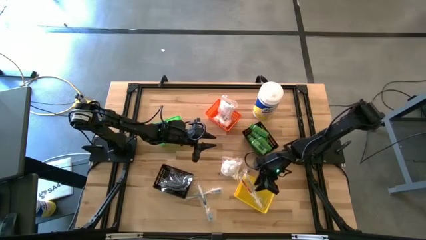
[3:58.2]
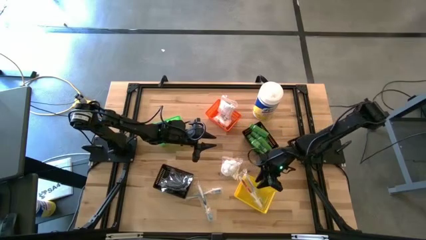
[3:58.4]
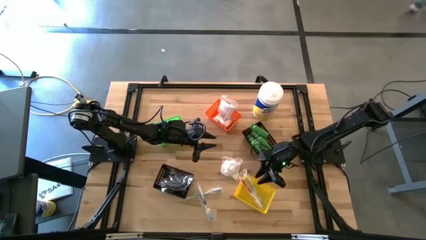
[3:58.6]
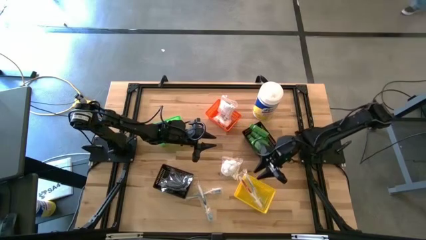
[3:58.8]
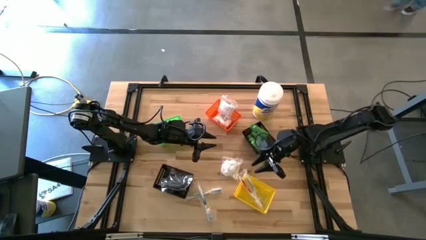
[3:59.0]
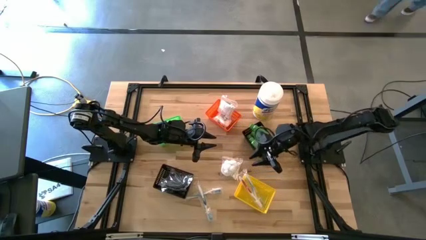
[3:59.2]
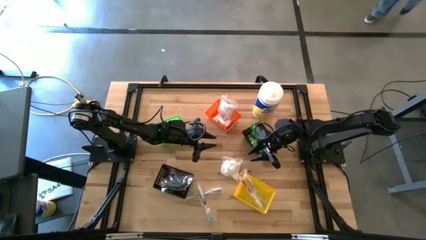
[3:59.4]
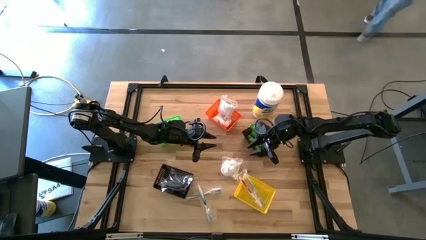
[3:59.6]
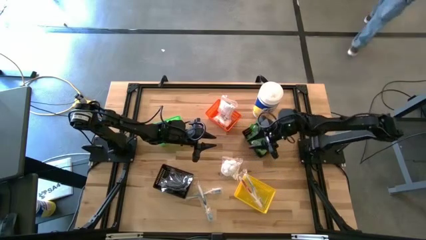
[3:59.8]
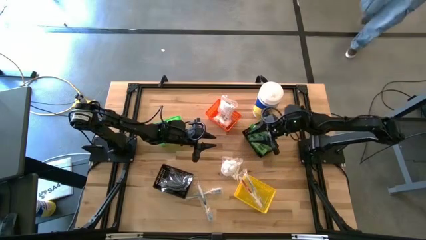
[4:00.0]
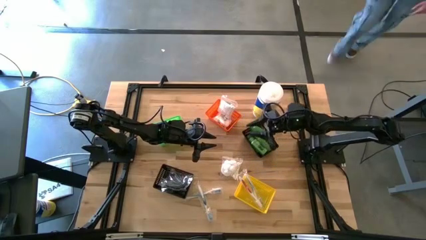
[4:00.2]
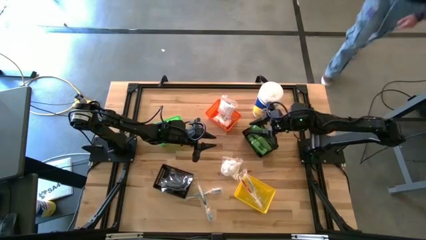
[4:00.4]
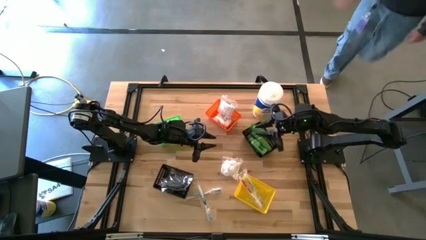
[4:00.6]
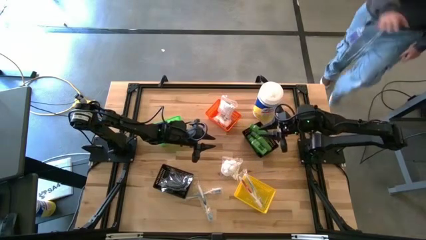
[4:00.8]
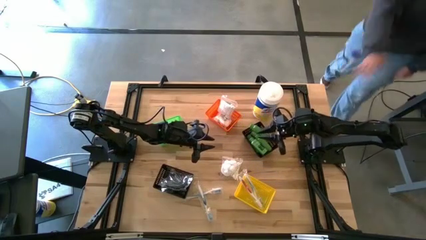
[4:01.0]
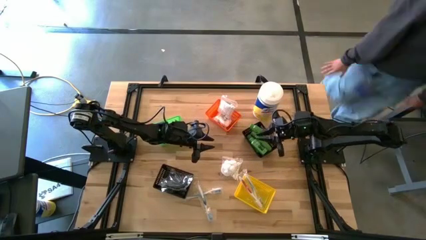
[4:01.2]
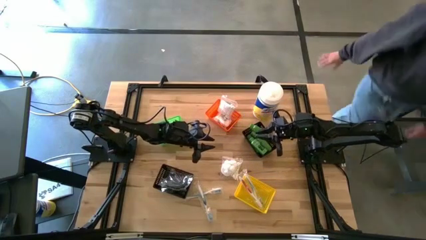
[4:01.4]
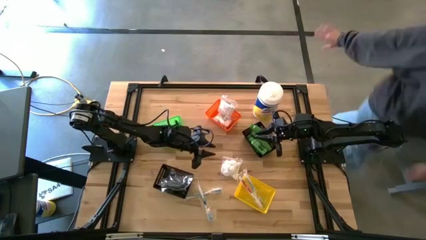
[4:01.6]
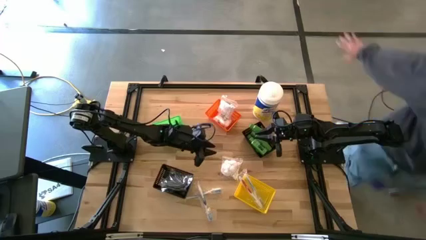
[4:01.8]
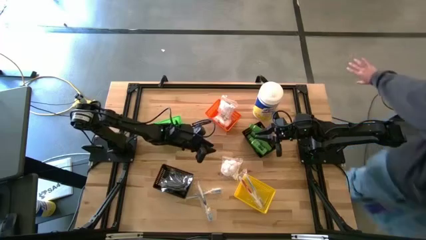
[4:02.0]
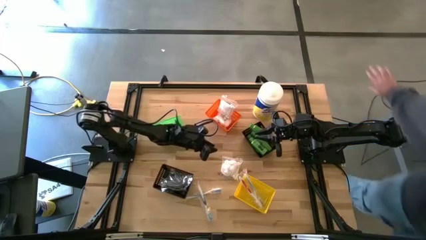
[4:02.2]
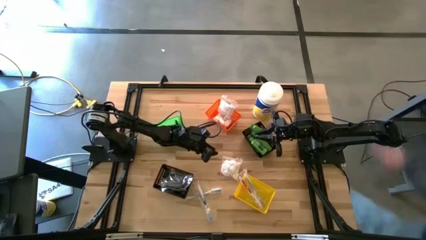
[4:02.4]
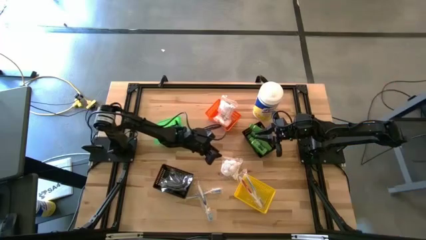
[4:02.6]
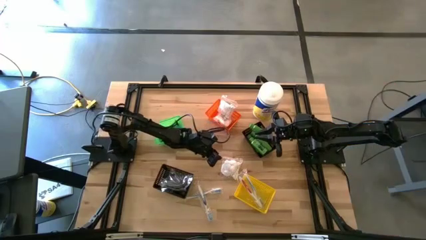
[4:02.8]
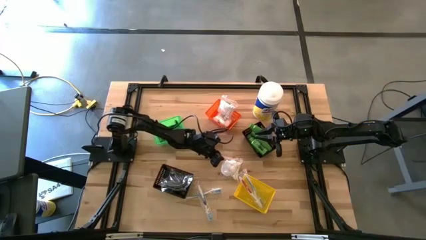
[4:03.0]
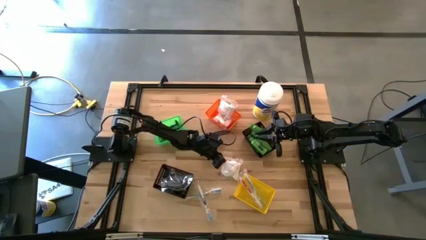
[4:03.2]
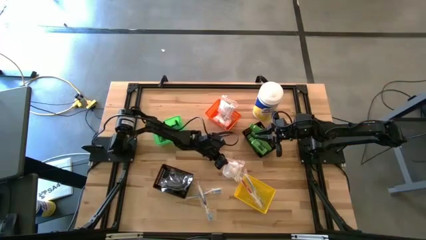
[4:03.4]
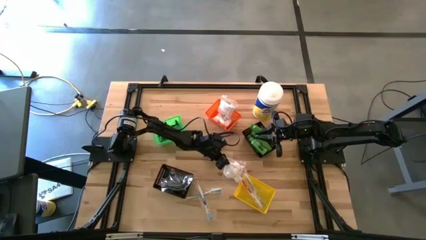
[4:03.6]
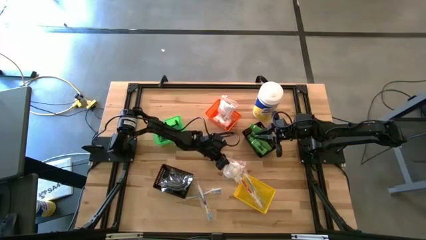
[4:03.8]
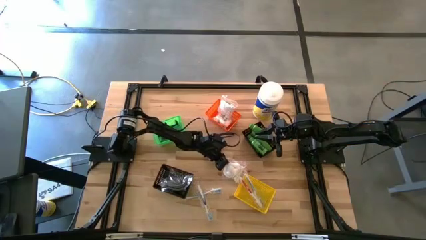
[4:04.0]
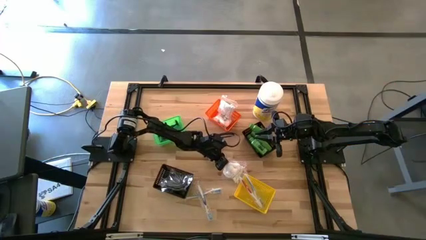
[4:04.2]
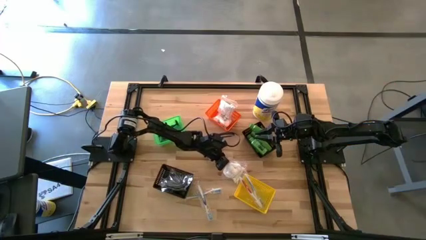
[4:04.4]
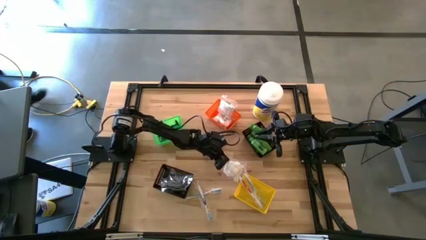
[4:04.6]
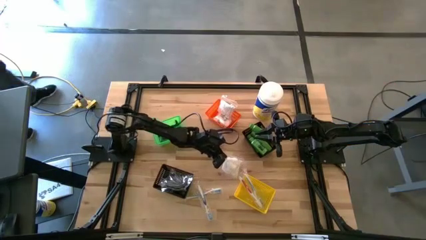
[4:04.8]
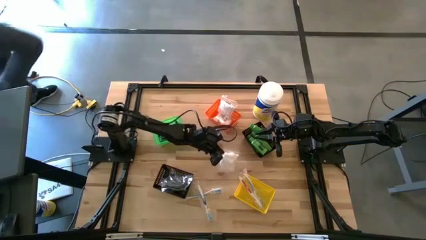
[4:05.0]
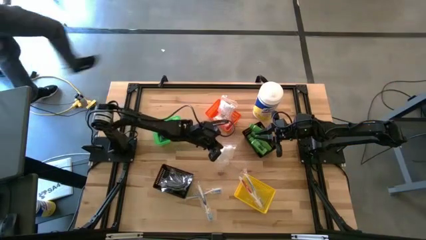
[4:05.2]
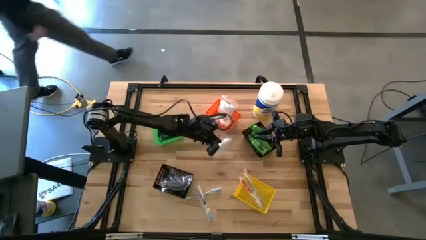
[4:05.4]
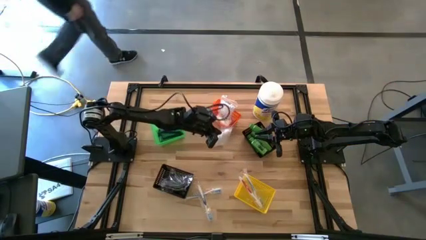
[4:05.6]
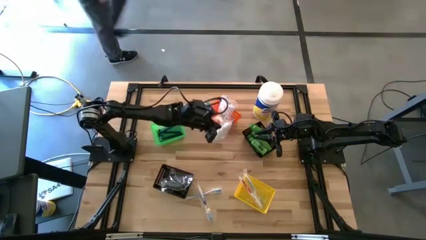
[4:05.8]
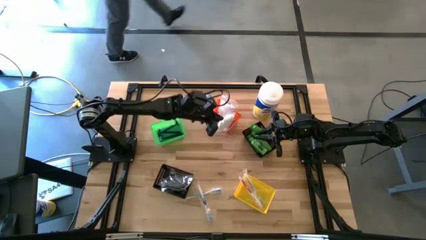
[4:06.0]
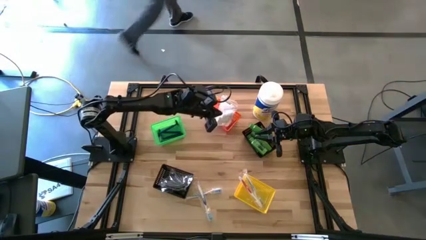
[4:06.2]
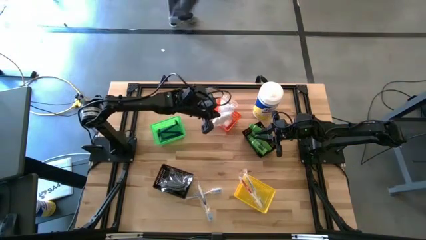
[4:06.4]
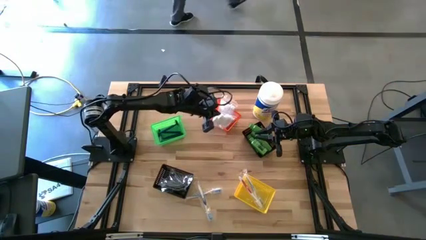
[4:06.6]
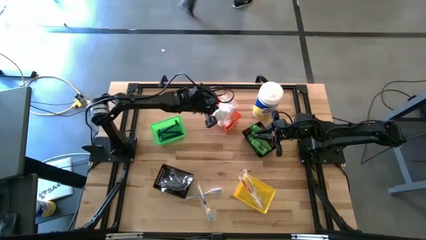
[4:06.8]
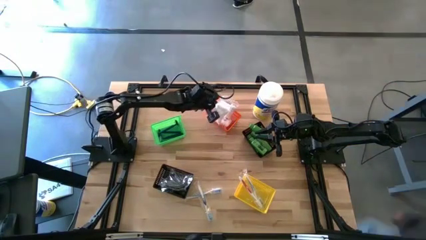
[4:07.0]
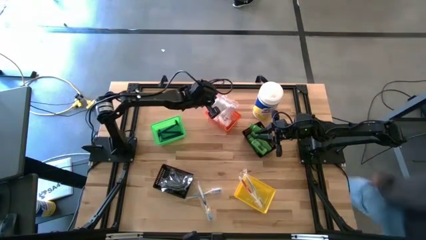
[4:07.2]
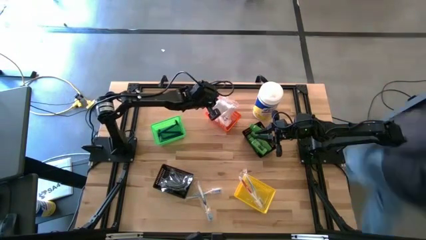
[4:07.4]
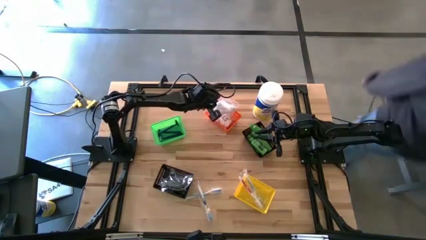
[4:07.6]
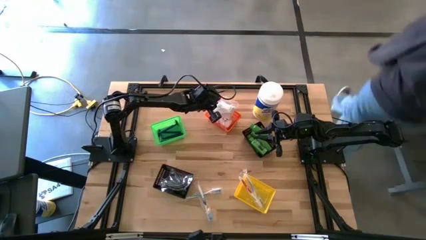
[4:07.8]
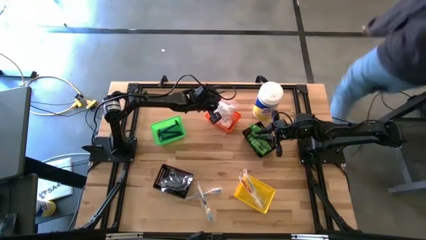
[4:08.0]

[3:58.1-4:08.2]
Task: Pick & Place Travel size toiletries
Put the white cotton pack into the orange bin
